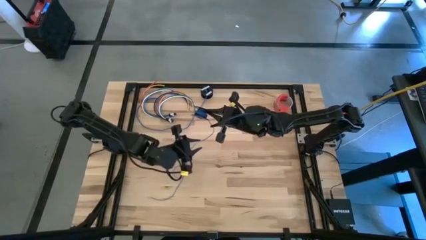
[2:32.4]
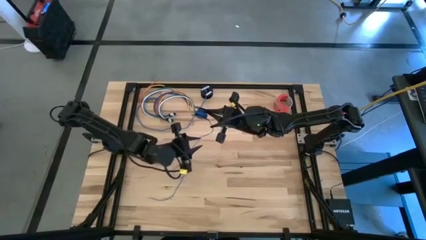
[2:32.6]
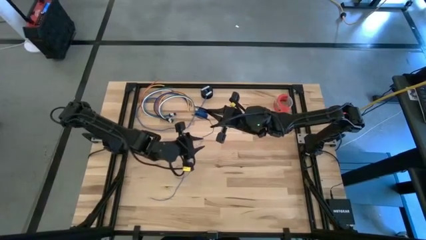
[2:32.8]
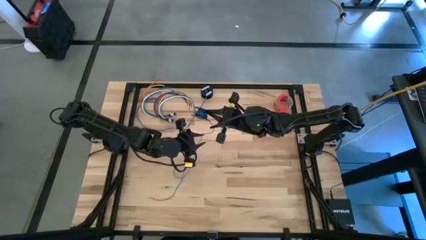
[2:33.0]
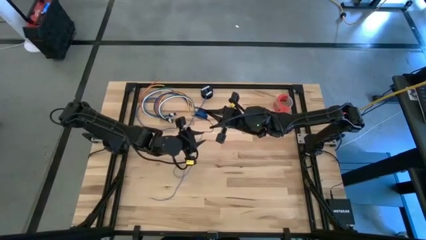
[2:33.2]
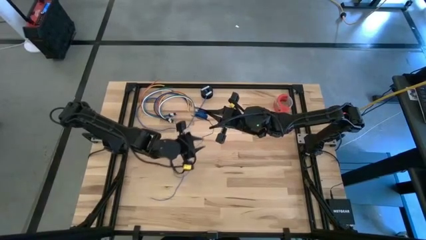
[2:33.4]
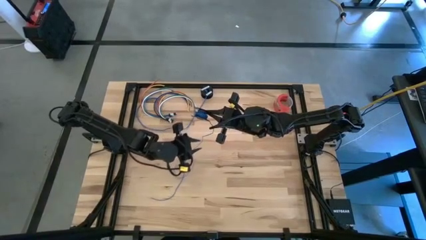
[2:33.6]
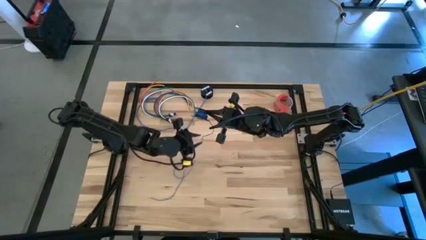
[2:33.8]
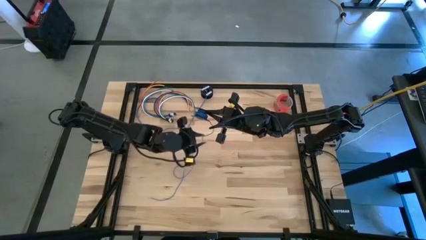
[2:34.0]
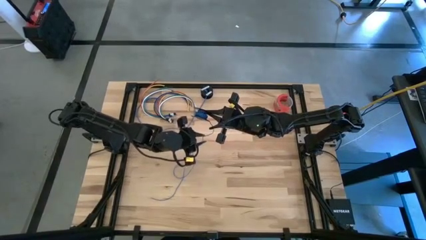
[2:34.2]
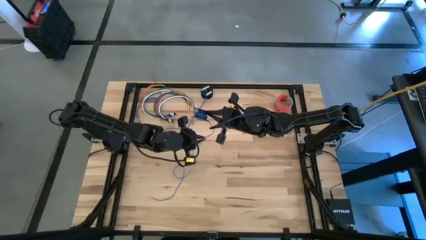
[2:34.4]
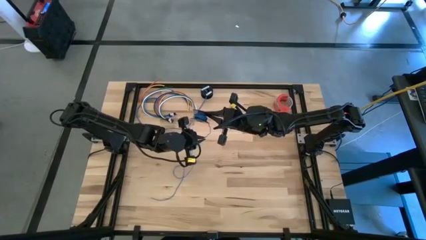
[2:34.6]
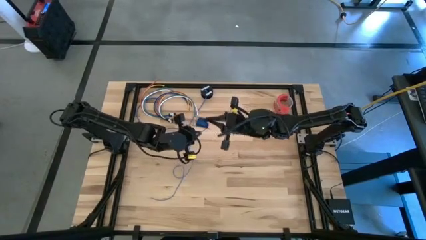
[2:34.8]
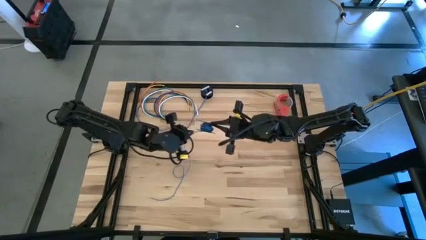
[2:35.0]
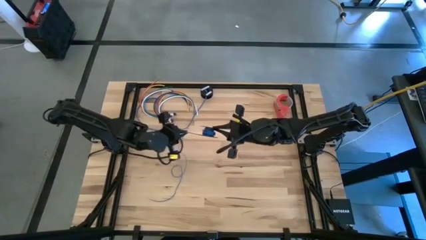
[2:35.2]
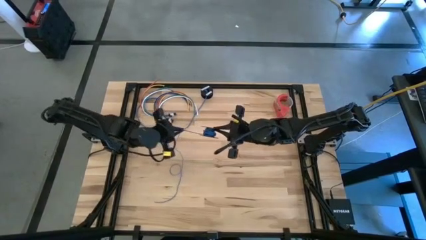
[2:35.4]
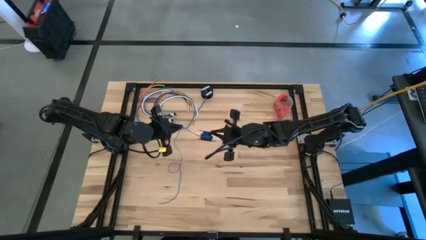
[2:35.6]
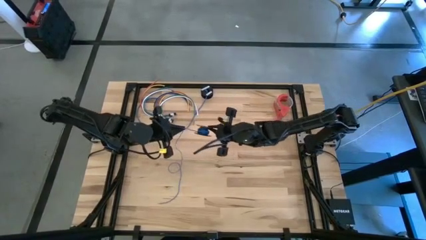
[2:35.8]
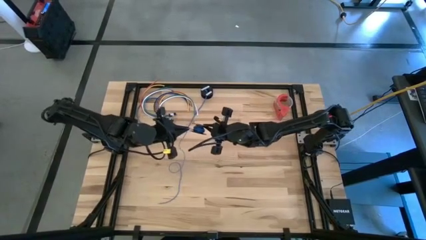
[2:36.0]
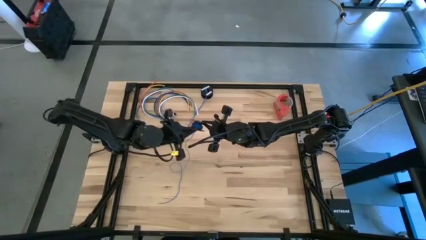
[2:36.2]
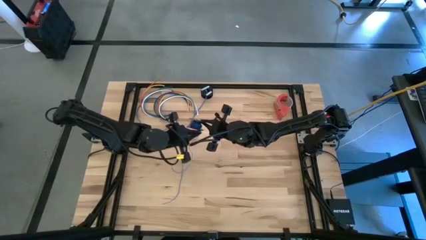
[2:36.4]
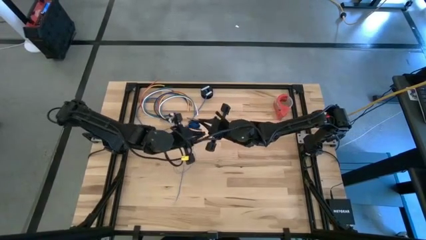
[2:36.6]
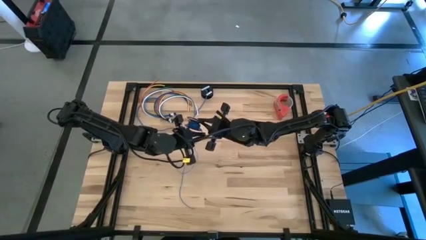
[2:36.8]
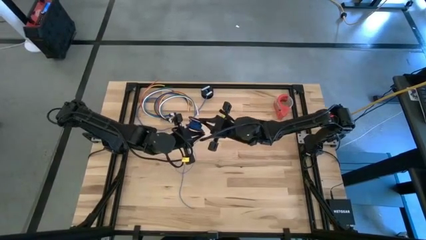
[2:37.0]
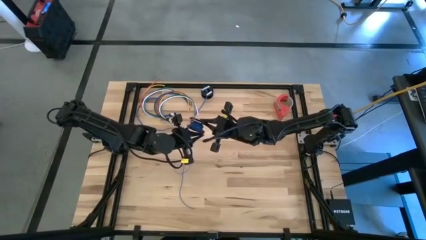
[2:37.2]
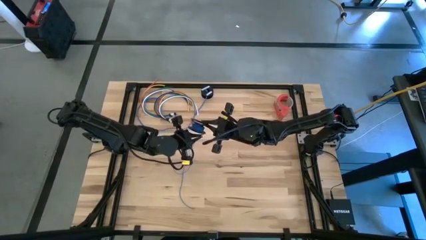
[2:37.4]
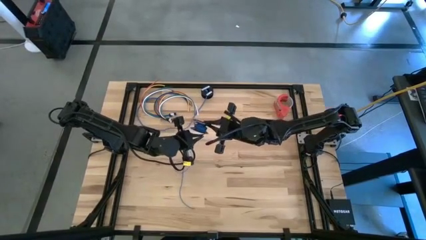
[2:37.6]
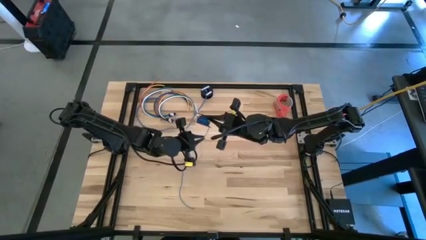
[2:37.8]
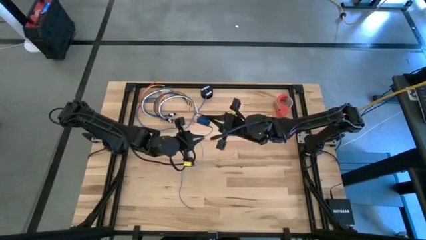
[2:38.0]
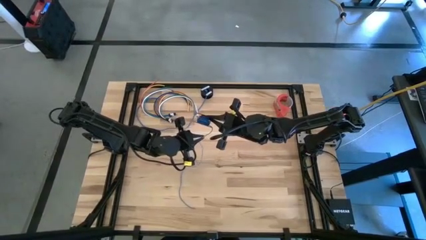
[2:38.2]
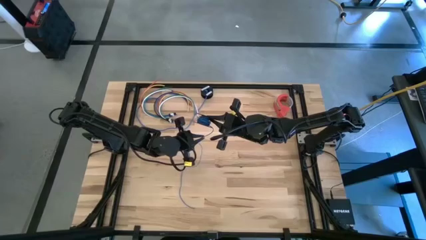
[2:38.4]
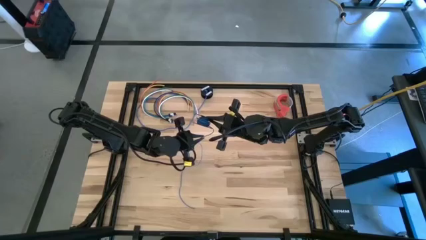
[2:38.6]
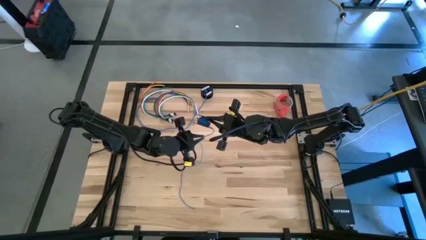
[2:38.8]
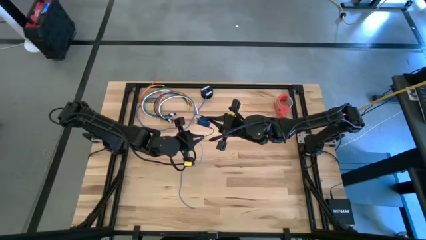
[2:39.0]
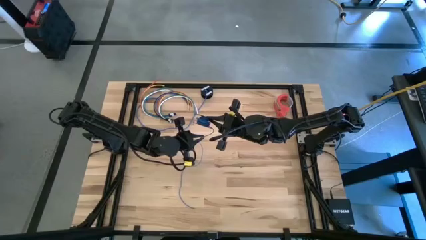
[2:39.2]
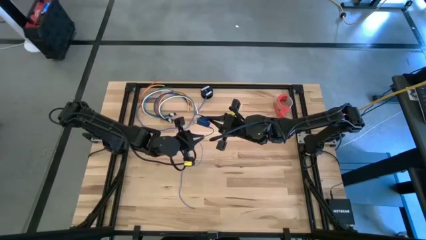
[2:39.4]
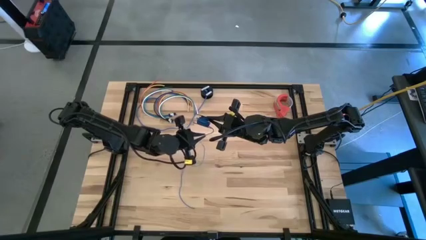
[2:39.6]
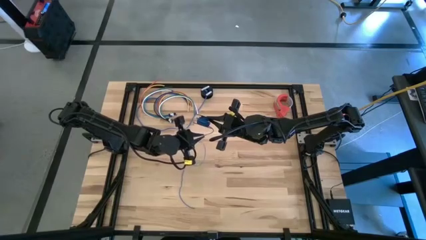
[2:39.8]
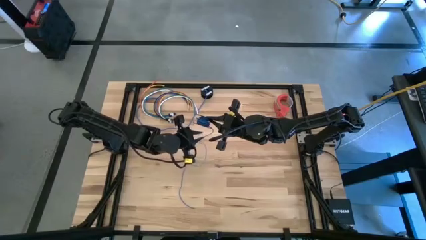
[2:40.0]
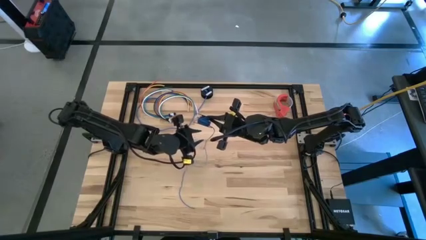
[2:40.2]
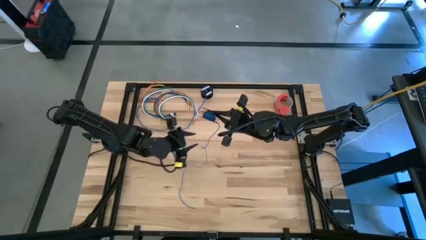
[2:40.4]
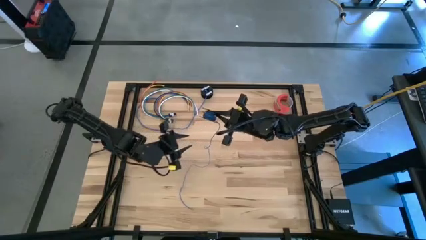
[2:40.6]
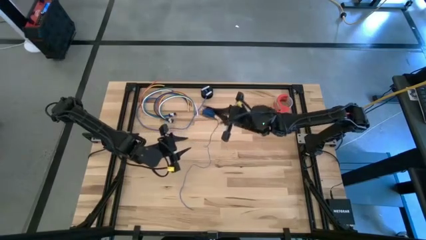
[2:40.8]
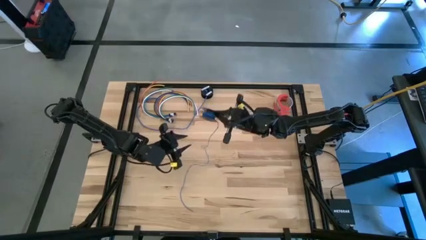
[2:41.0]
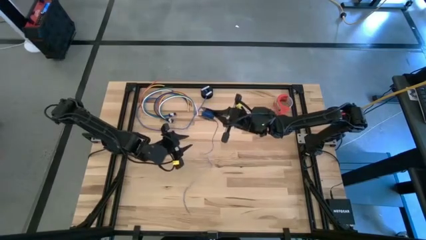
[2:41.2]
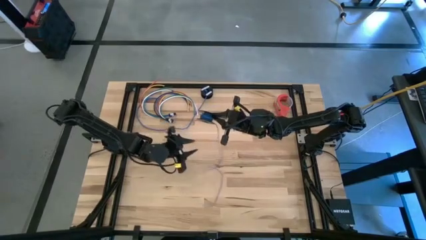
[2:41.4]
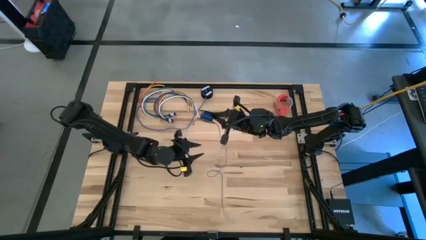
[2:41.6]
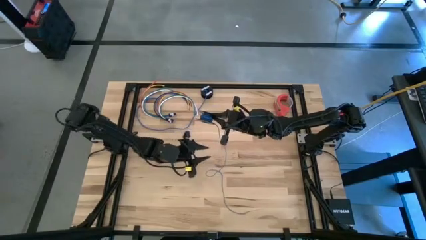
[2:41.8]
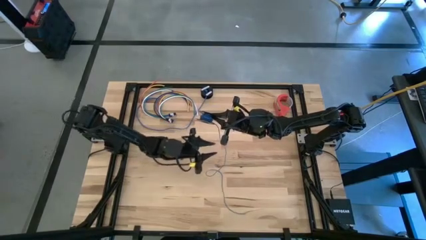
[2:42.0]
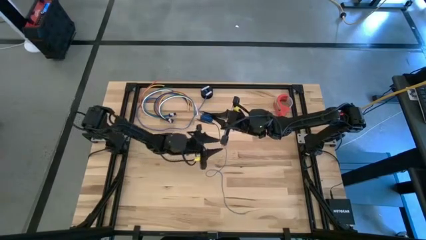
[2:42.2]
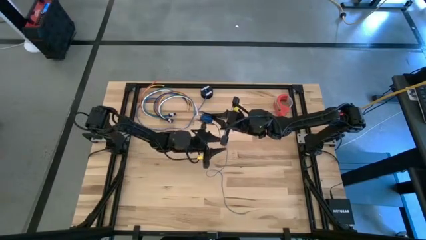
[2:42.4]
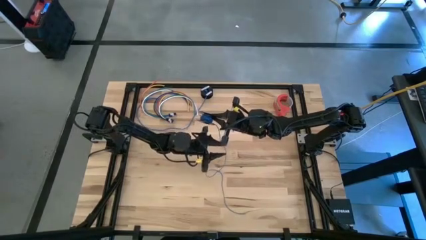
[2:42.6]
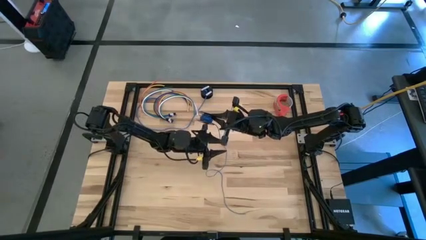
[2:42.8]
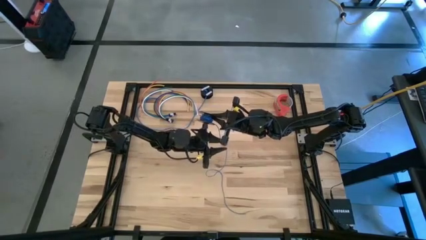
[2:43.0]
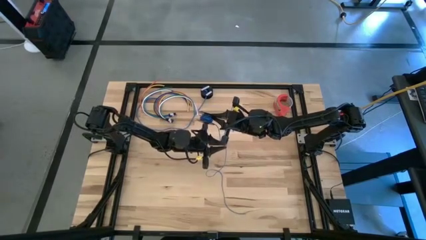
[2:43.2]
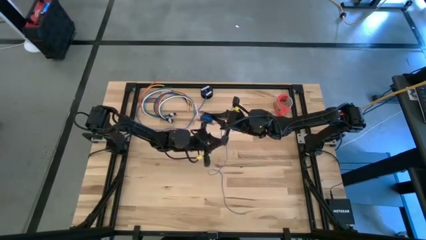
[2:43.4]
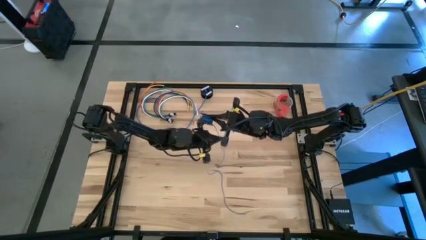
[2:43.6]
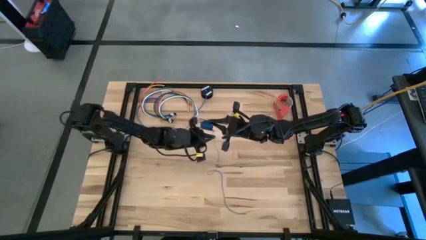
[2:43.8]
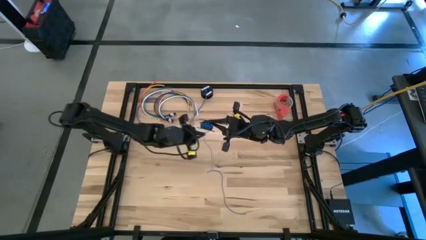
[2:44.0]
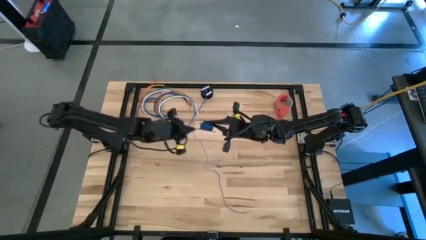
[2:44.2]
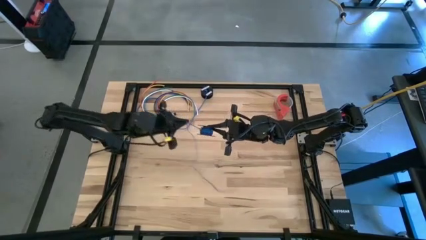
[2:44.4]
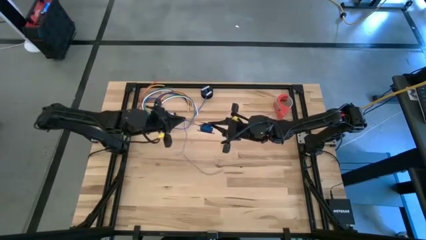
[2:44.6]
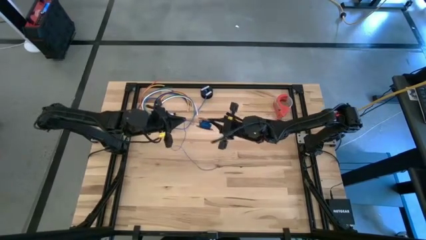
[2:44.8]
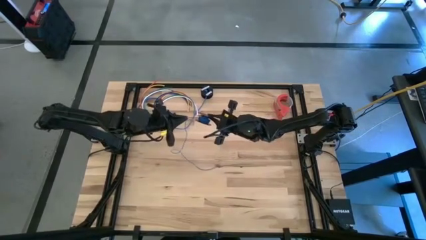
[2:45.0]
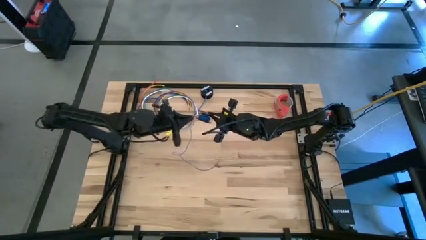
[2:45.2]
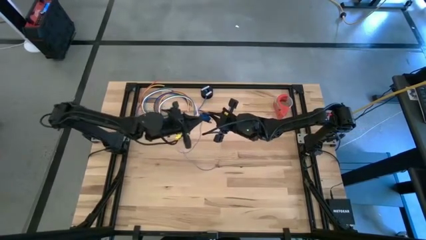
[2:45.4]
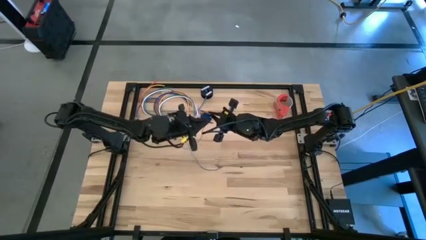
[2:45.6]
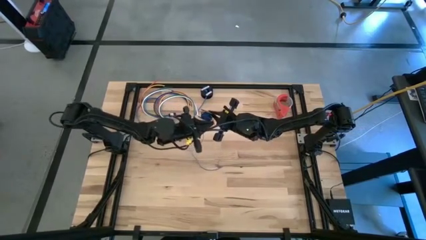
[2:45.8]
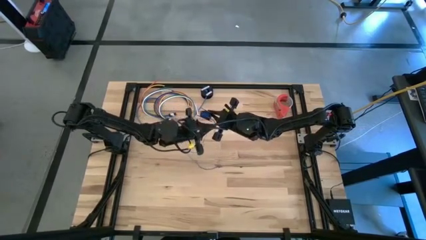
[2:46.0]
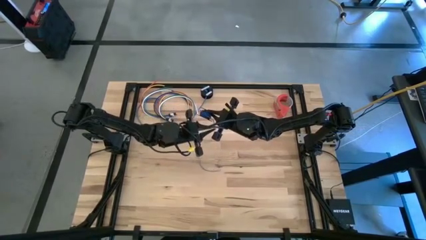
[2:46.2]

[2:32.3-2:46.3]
Task: Coil cords
Coil the blue wire onto the spool

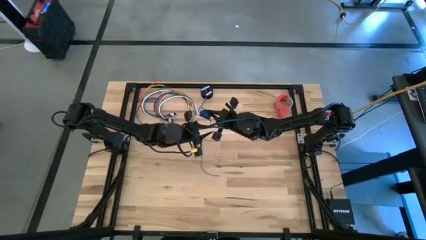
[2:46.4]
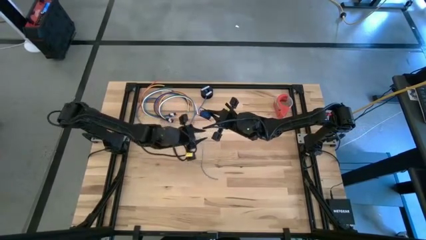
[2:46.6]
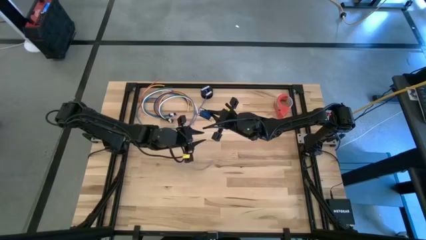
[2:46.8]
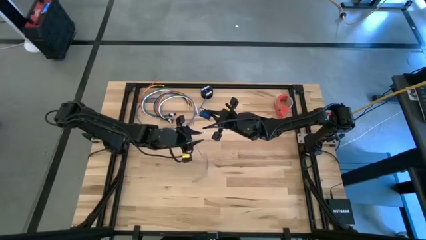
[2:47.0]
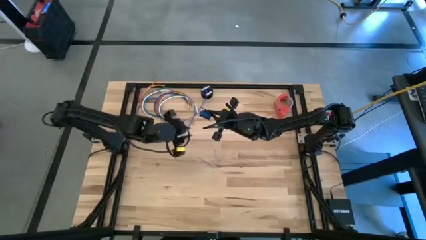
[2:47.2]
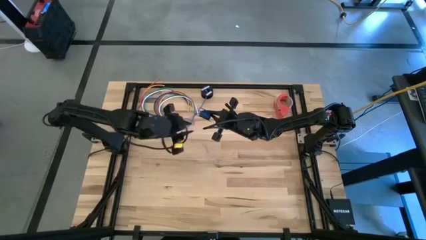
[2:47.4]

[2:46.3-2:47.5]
Coil the blue wire onto the spool

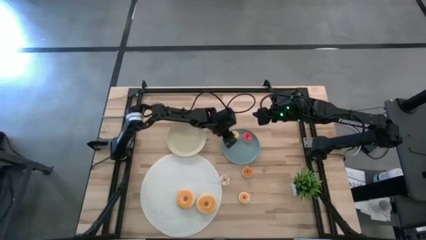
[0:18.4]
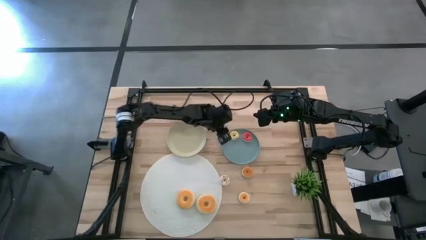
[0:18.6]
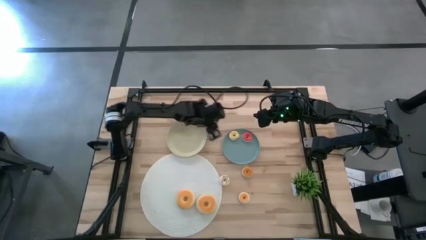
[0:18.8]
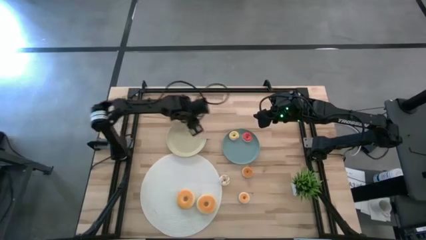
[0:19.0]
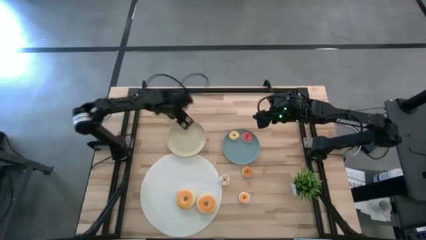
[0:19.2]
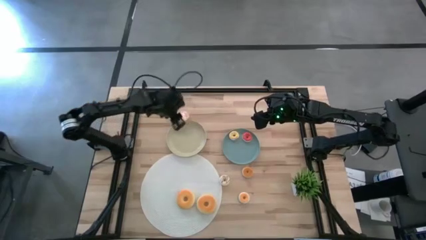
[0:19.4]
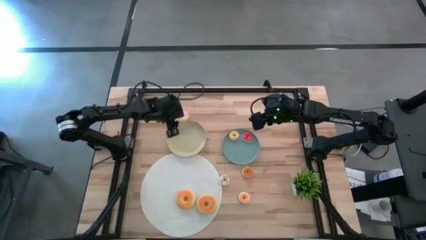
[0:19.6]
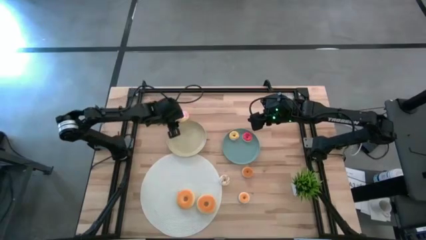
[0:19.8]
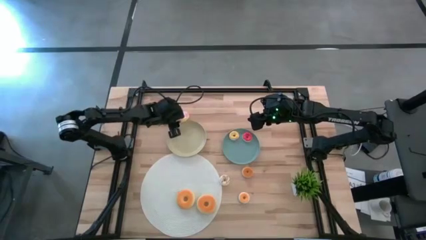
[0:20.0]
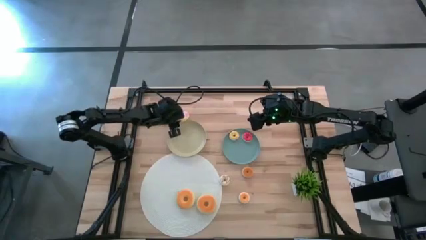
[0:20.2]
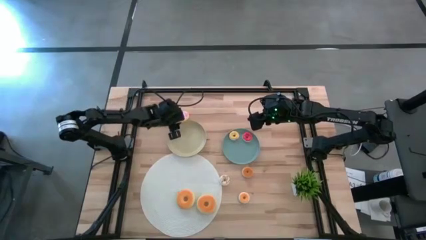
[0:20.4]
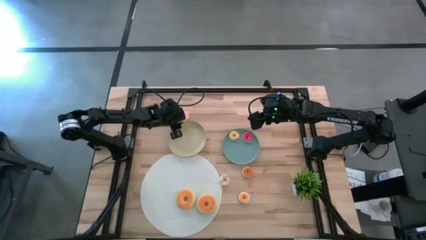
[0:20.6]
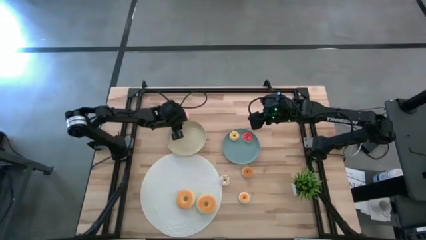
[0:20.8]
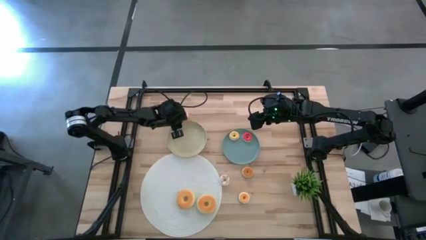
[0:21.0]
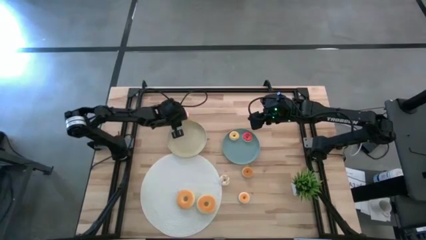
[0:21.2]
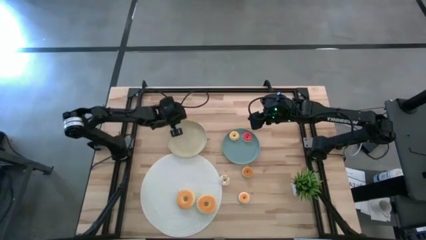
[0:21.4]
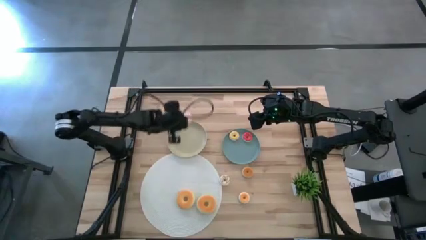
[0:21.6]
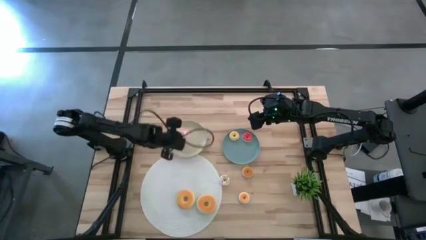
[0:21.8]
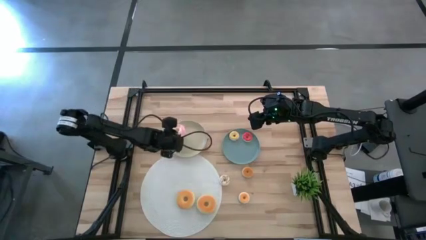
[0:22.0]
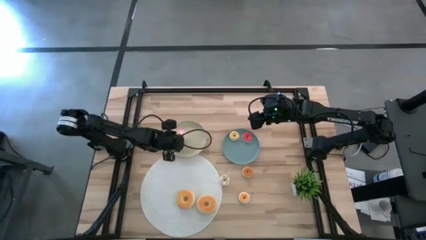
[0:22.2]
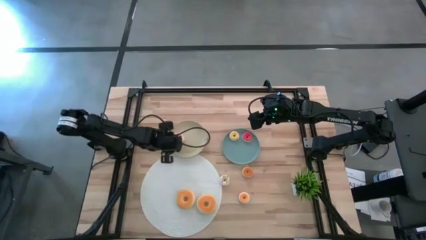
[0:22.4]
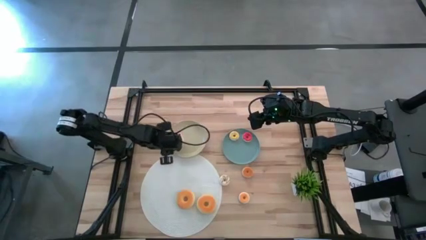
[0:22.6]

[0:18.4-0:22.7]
Task: Pick & Place donuts
Put the big pink donut on the brown plate
